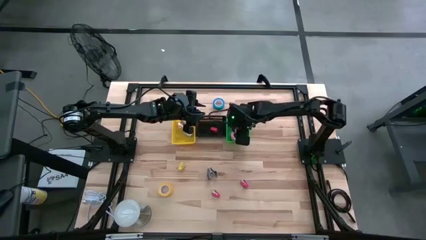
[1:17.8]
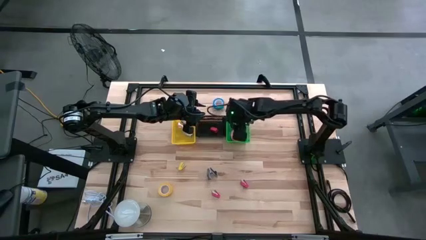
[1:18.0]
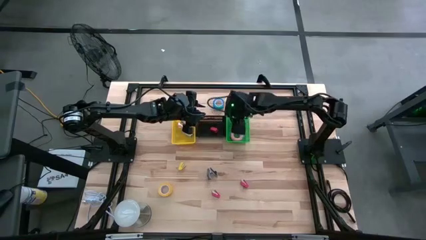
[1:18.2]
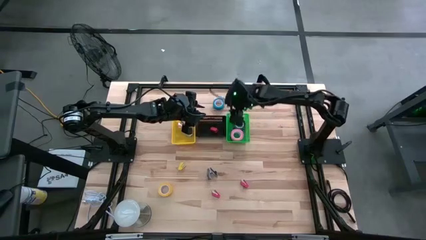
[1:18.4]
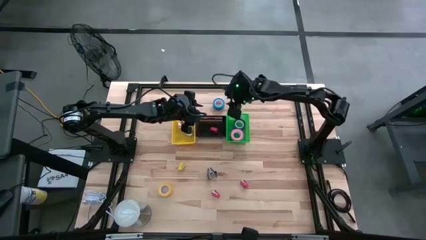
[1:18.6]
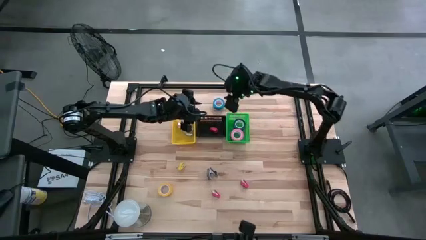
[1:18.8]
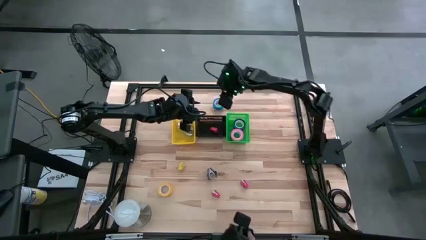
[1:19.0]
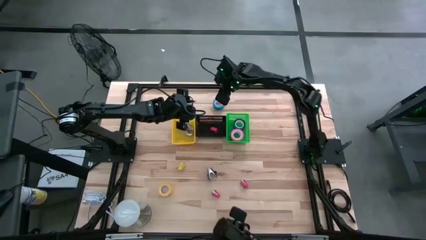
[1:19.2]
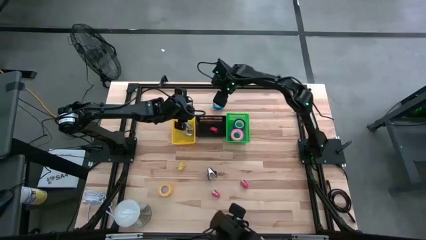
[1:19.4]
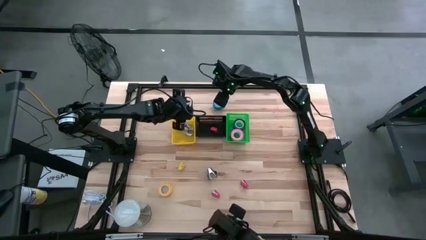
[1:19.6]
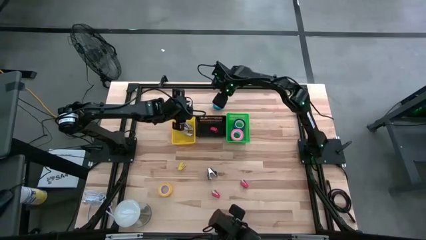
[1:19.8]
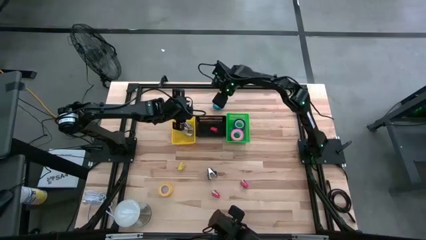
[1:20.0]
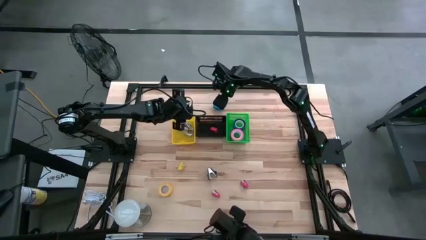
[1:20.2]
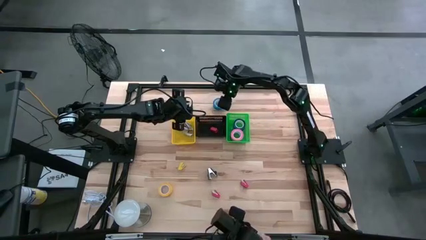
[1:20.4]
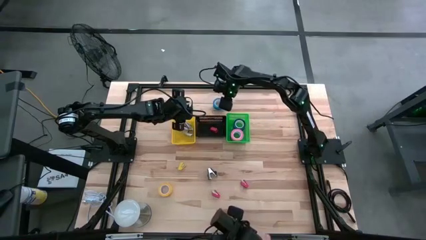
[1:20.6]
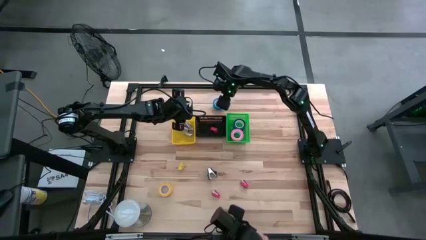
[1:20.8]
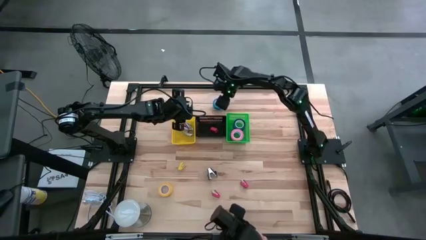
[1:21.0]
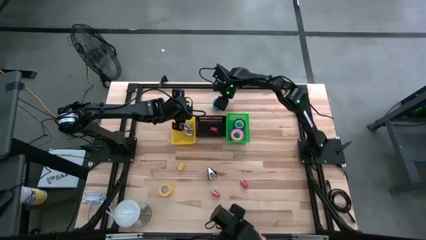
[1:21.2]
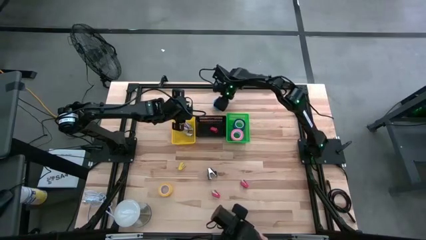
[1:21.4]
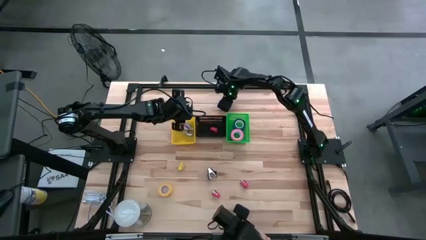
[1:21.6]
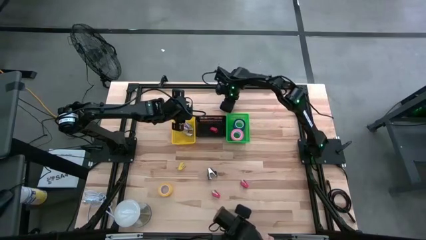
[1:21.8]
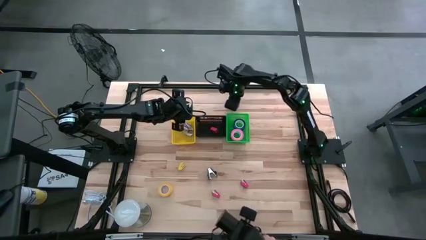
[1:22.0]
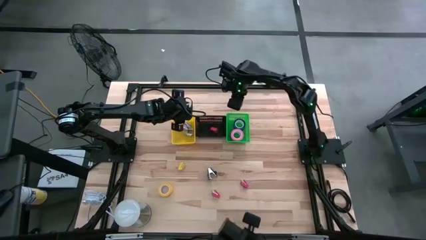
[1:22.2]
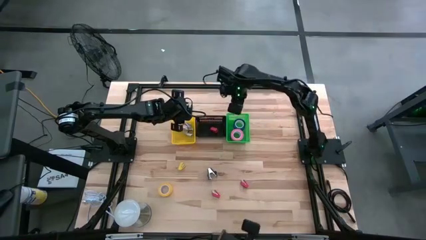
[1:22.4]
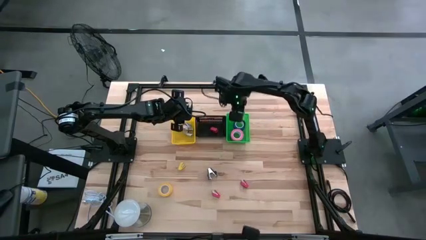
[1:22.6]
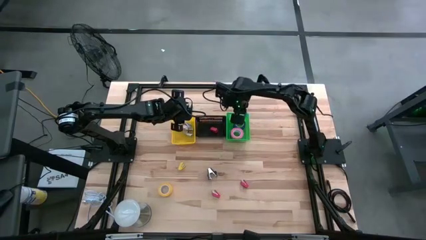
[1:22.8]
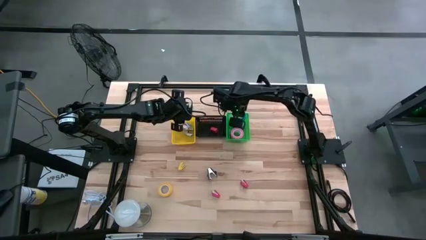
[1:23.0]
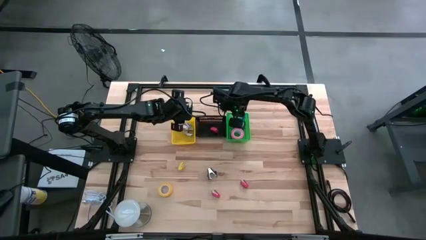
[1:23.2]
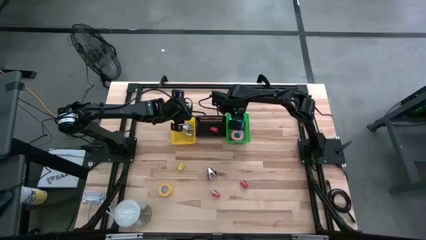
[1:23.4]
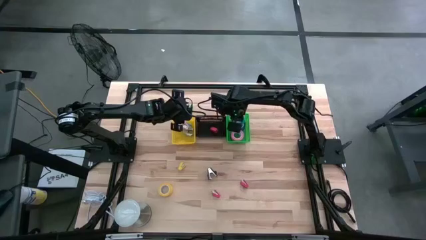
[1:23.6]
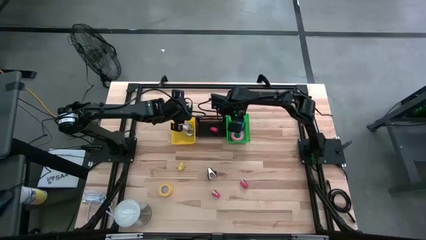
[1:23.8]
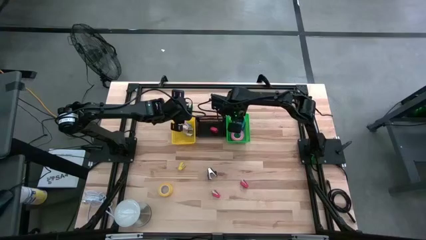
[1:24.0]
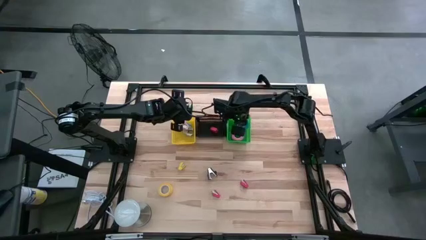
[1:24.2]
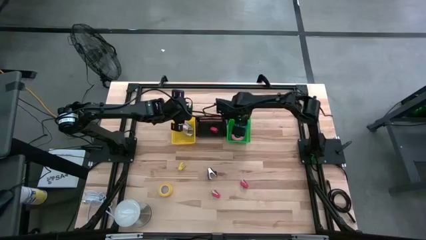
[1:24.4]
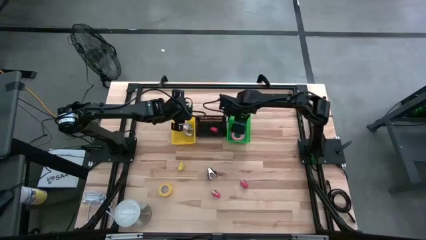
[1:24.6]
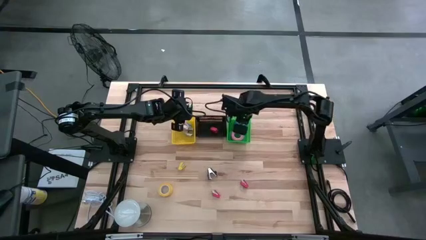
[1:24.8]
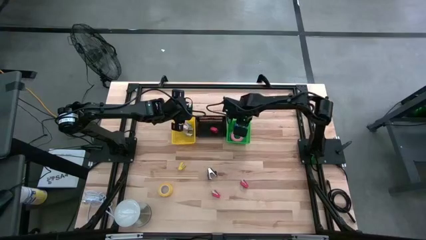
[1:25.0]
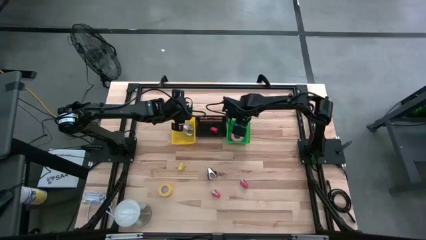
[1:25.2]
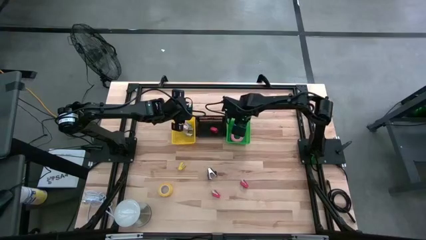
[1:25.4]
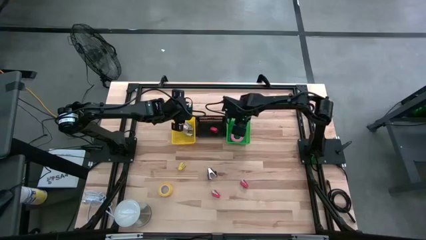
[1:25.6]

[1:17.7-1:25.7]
Task: Pick and place Stapler, Stapler remover, tape
Put the light blue tape into the green bin

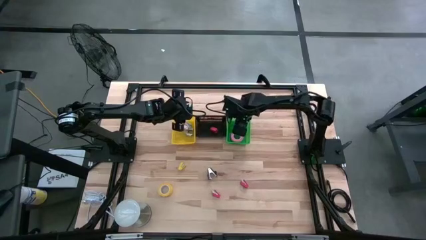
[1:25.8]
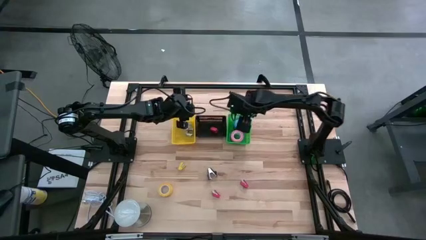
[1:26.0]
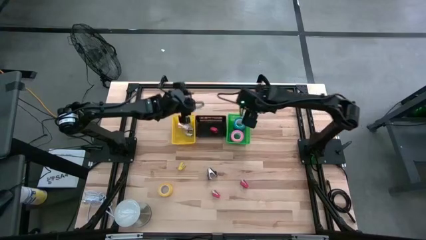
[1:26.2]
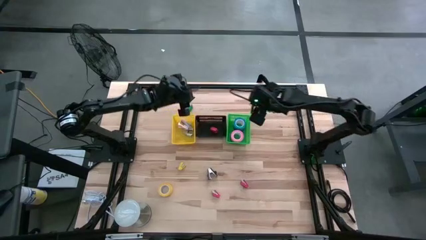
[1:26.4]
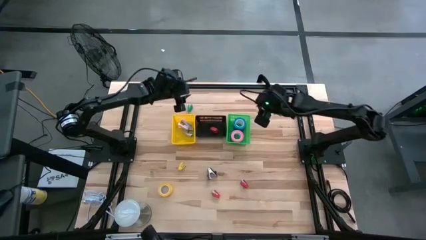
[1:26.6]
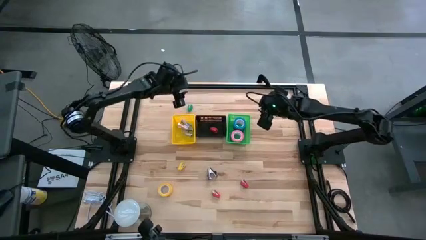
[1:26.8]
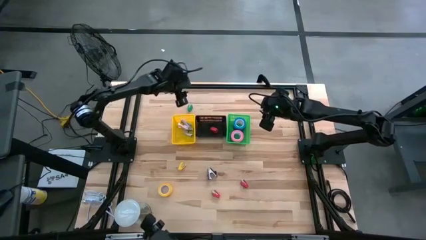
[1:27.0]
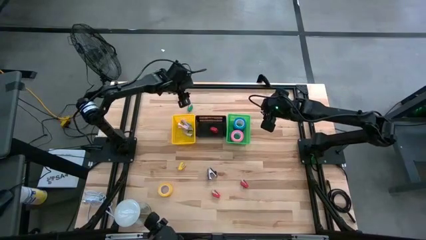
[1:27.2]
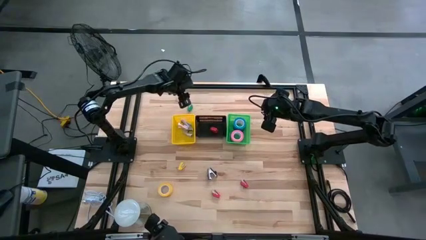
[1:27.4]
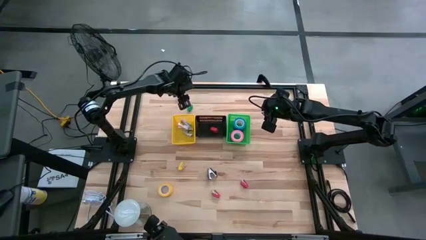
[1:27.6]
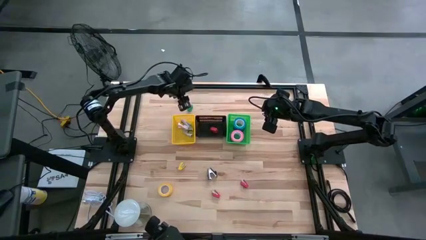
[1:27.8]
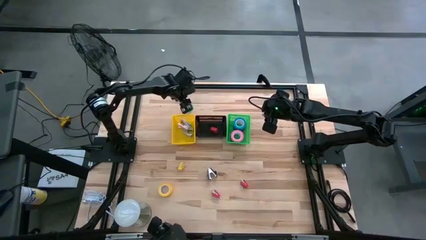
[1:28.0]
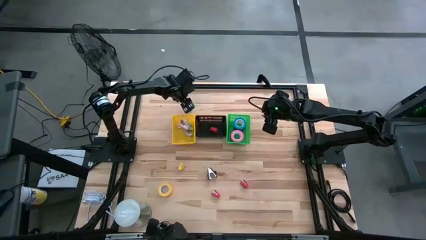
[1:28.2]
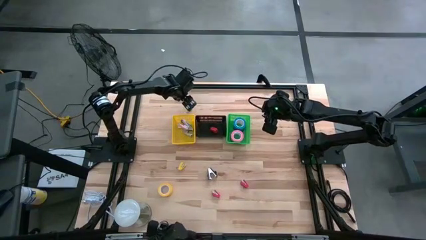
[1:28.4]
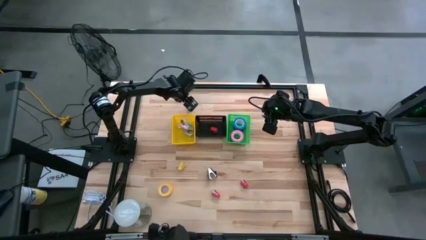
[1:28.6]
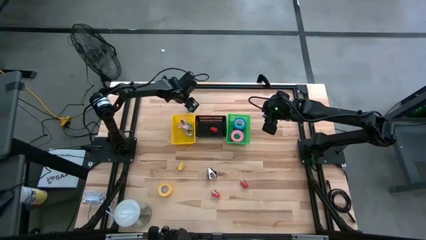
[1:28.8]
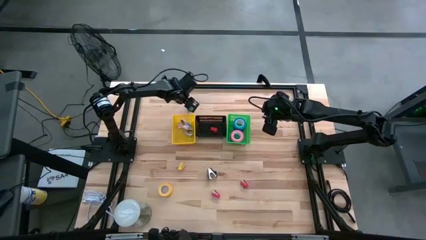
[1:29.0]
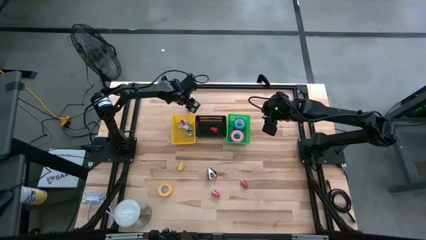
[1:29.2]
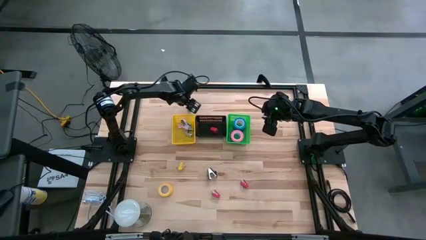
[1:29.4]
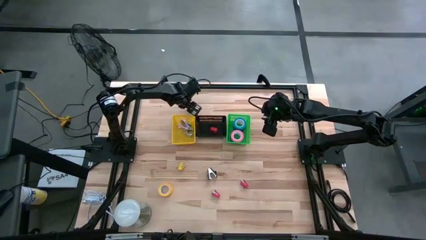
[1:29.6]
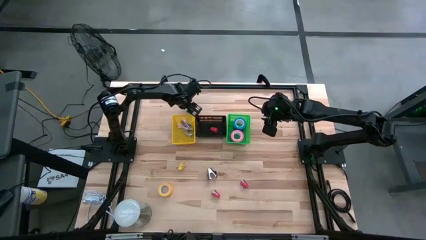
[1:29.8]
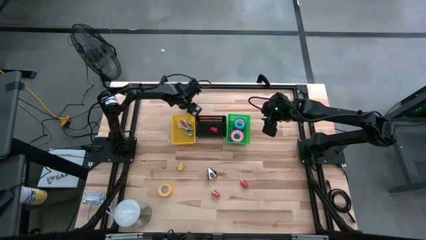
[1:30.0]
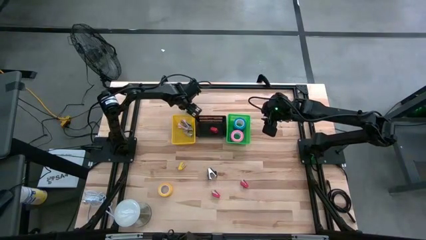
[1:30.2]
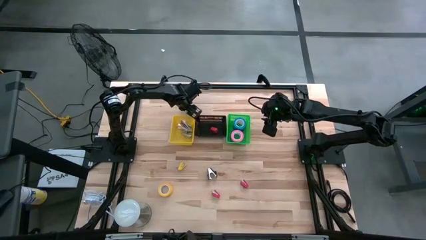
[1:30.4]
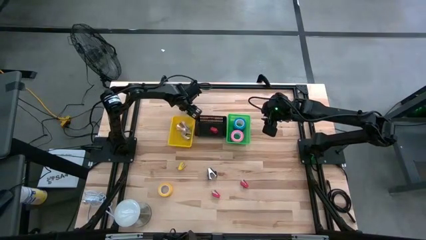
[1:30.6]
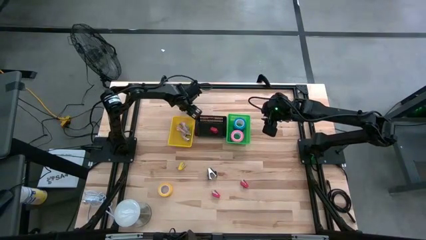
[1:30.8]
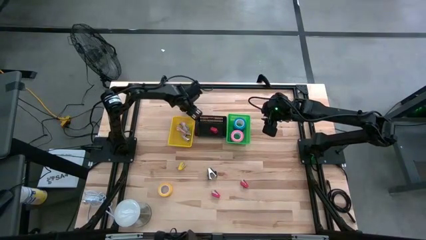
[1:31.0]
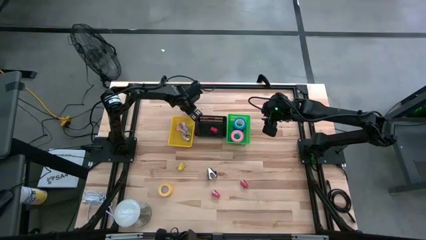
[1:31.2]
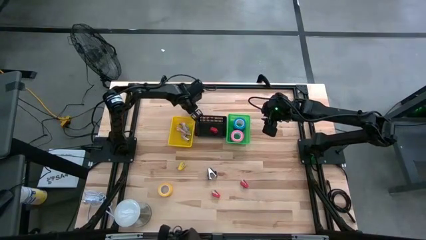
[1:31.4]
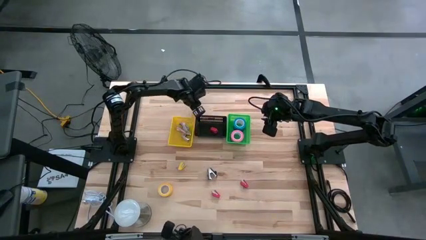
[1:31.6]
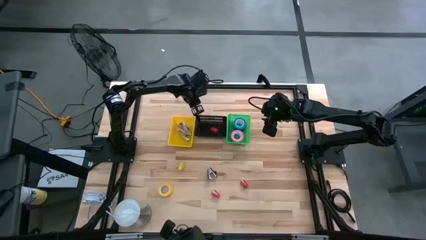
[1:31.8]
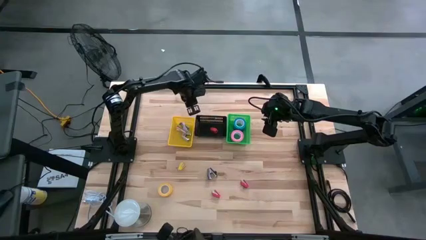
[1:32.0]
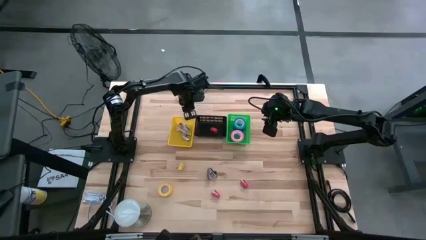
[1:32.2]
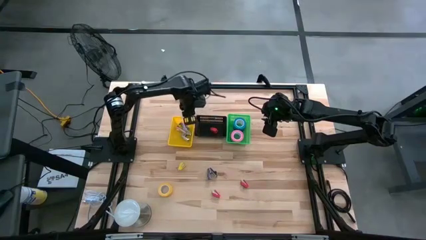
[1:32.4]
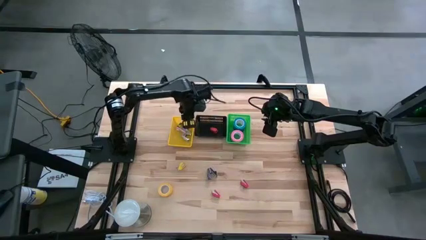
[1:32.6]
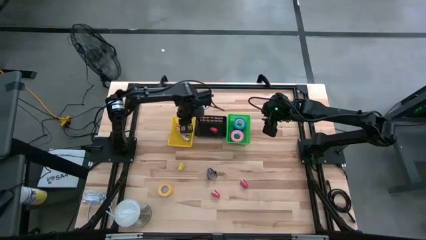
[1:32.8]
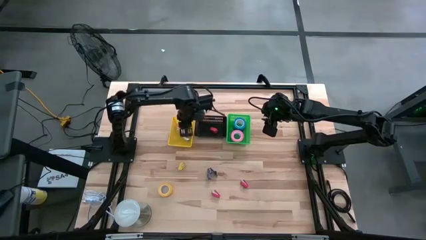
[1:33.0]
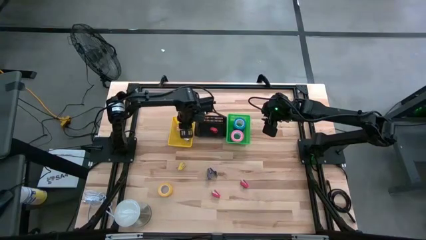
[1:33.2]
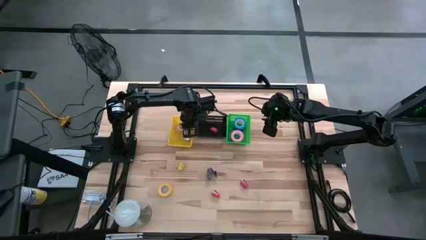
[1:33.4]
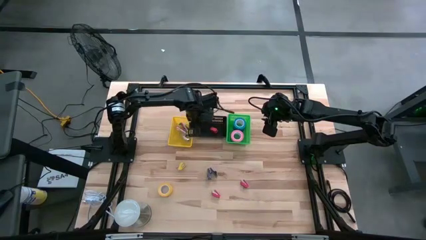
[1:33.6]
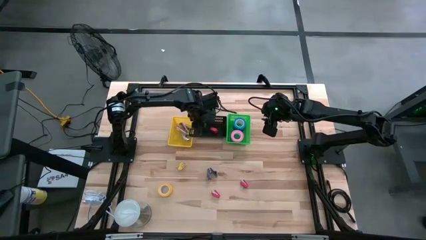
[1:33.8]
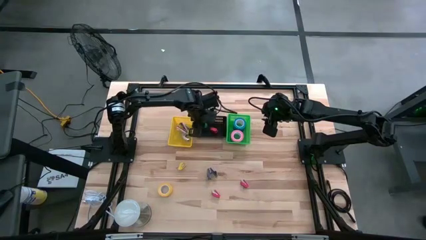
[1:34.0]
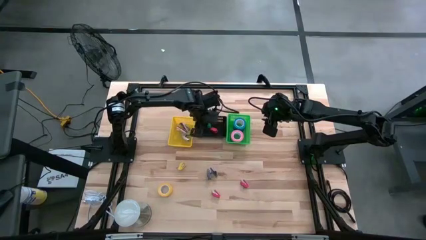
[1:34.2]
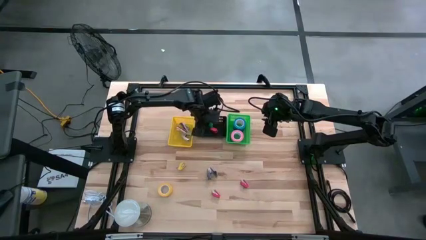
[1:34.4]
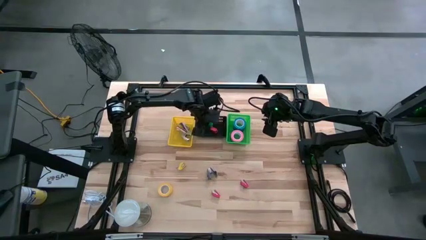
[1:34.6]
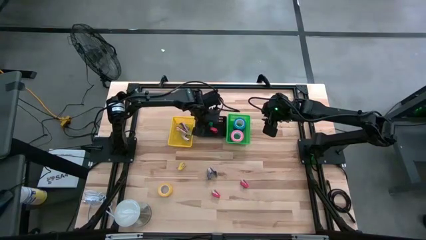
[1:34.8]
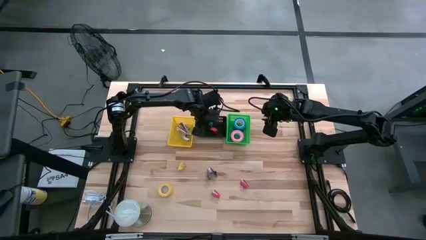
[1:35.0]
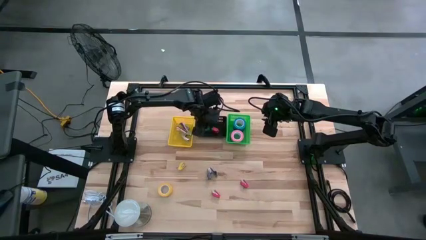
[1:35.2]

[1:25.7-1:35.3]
Put the green stapler into the black bin
